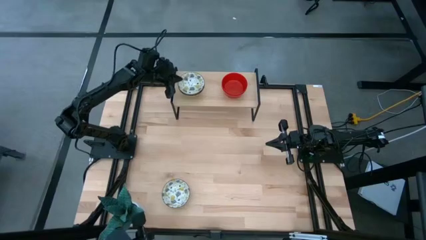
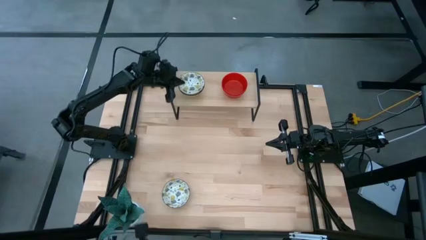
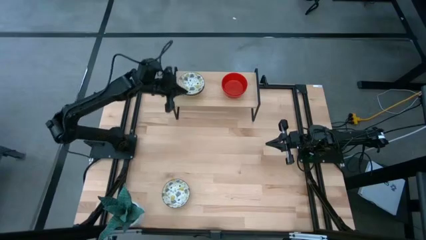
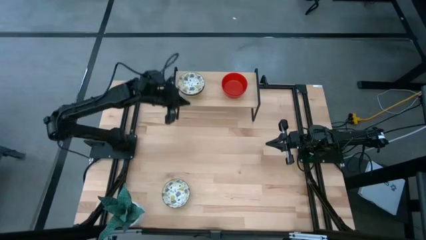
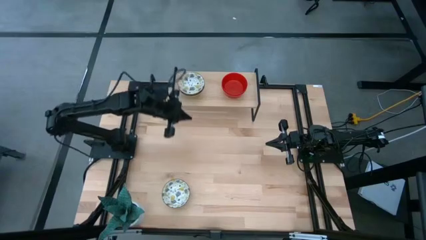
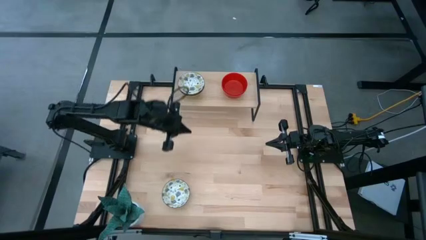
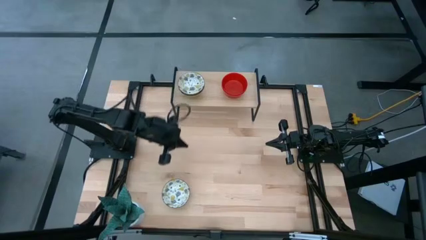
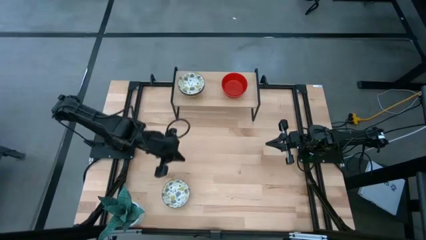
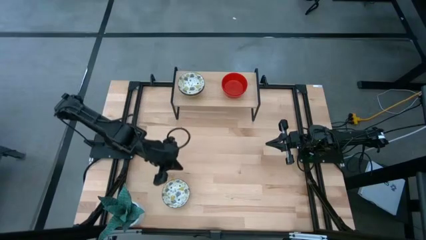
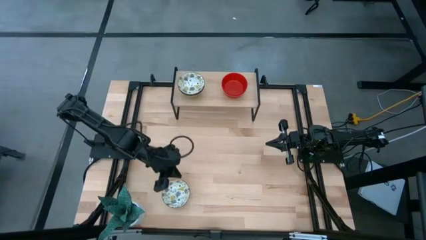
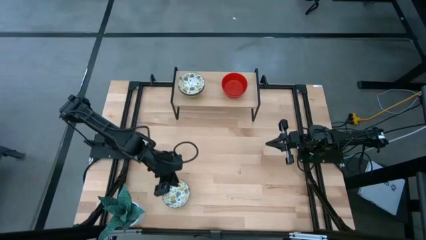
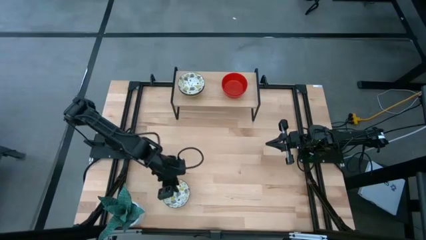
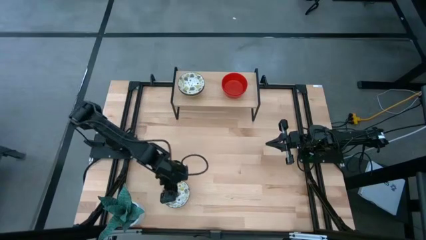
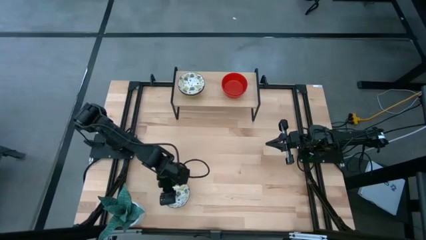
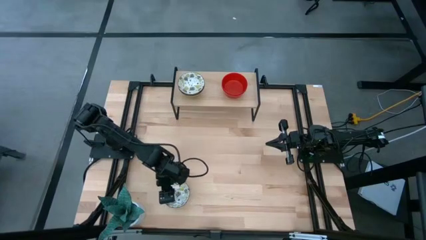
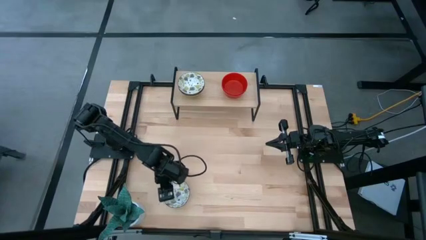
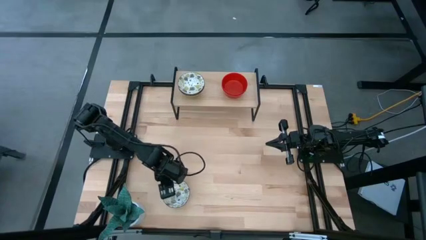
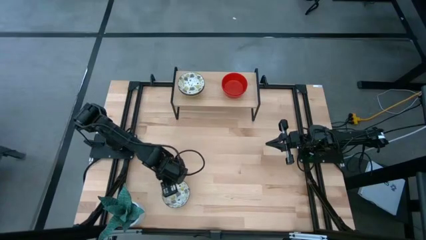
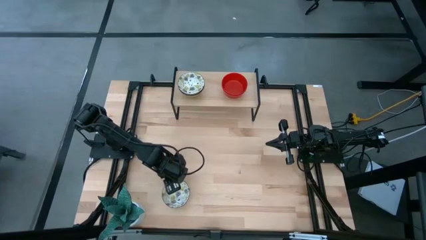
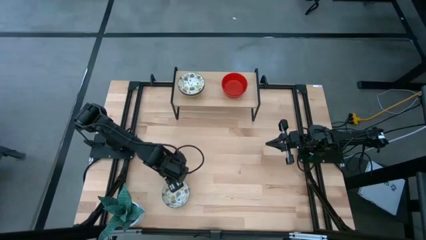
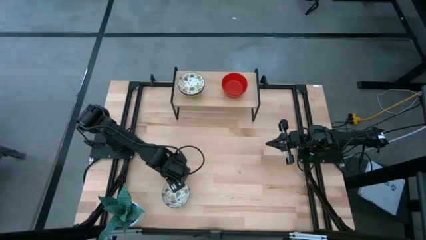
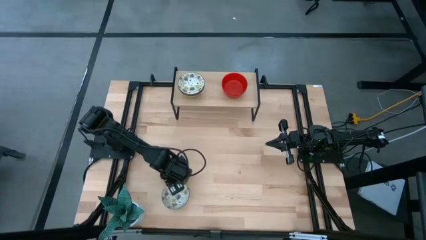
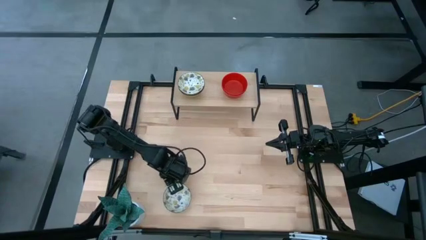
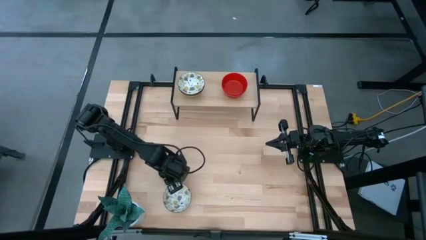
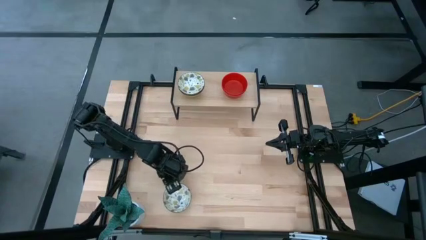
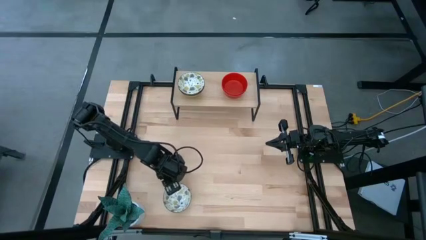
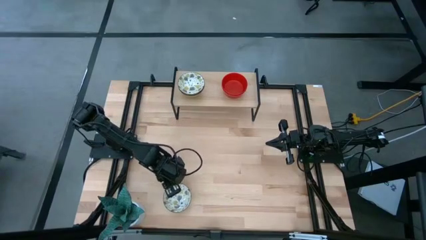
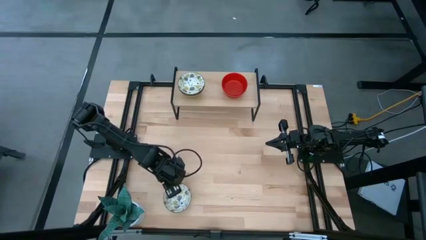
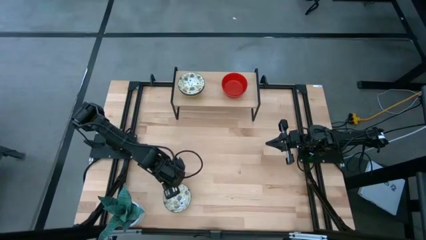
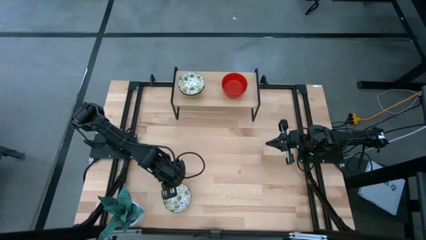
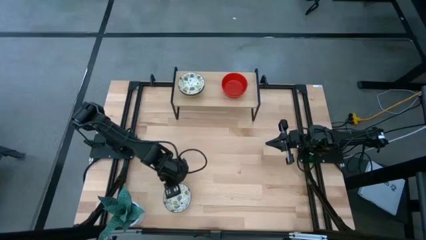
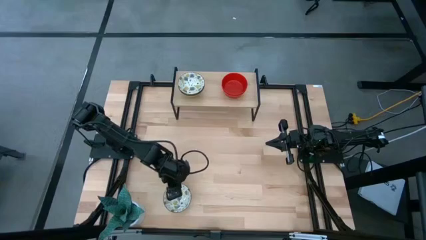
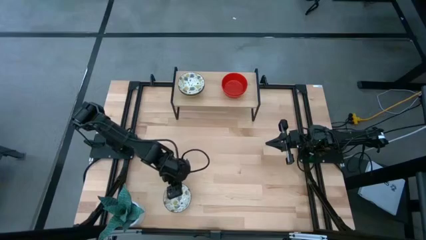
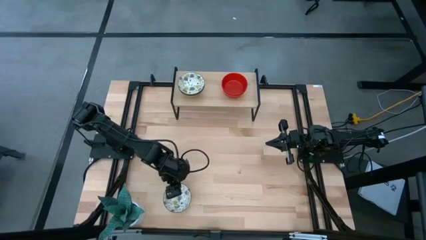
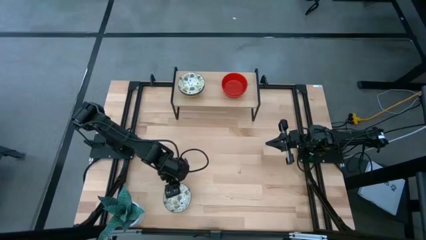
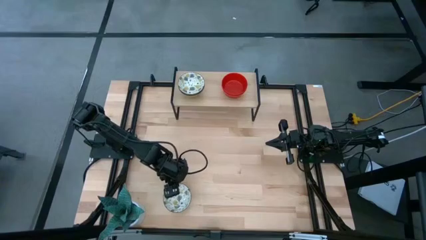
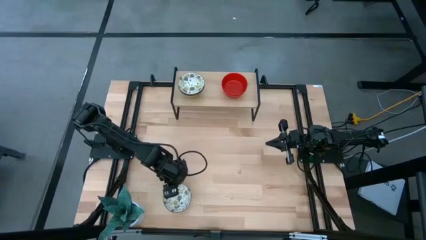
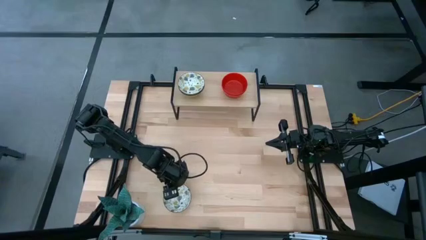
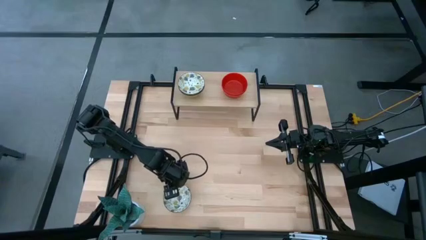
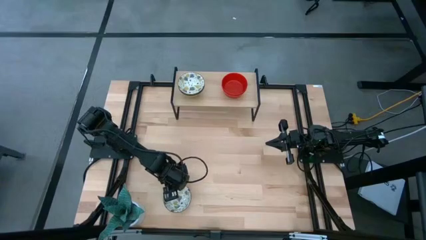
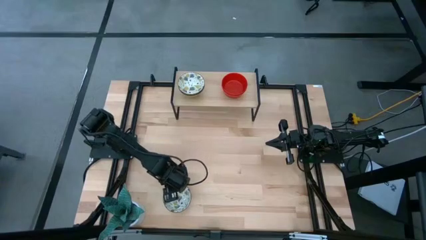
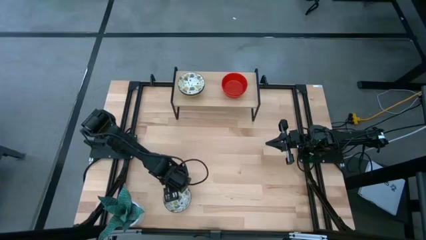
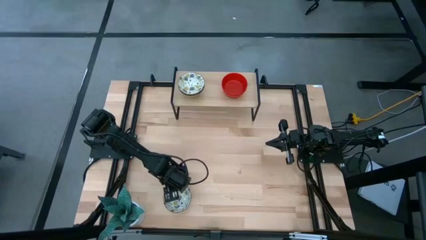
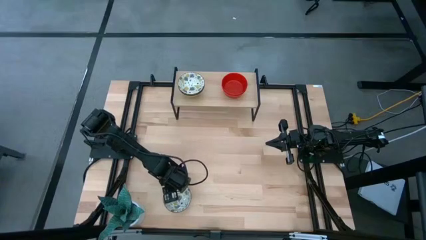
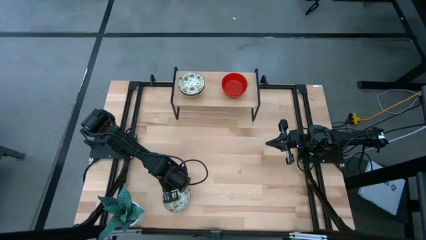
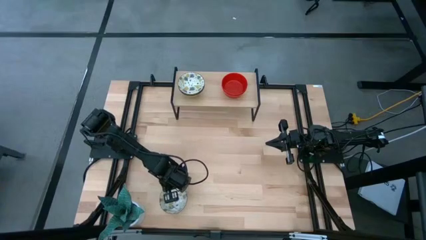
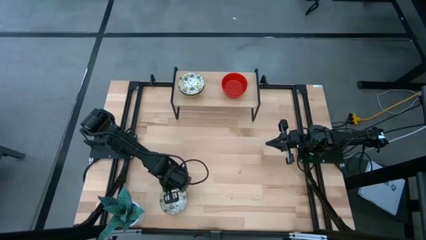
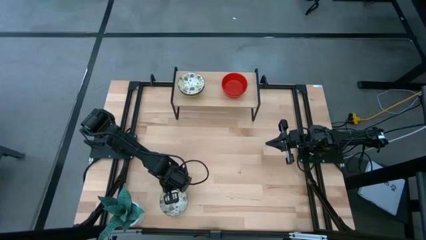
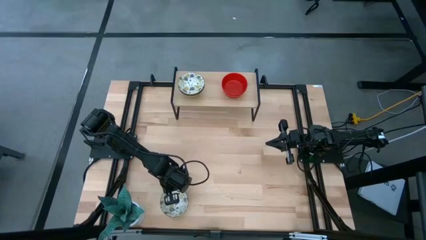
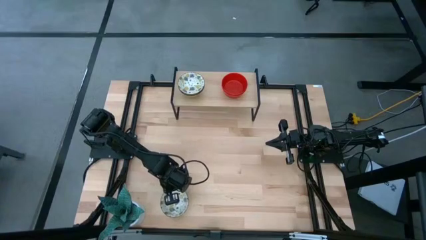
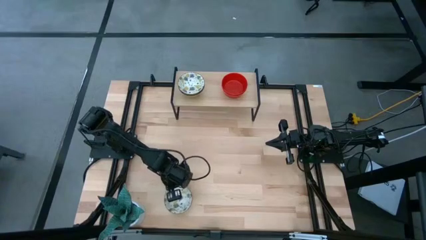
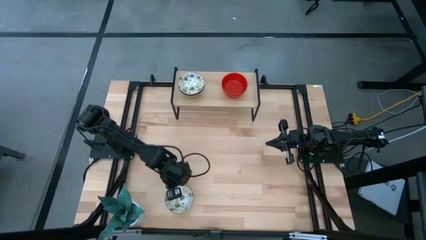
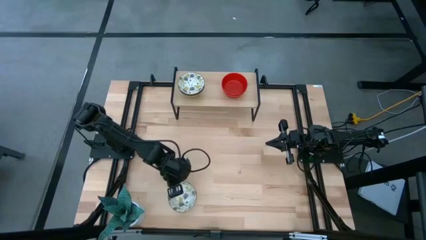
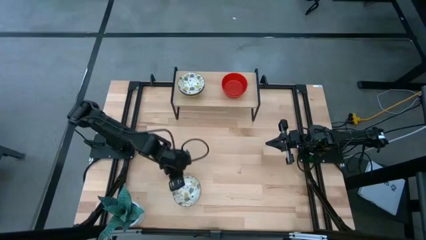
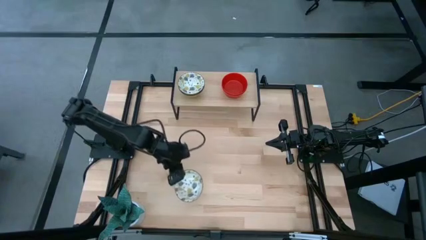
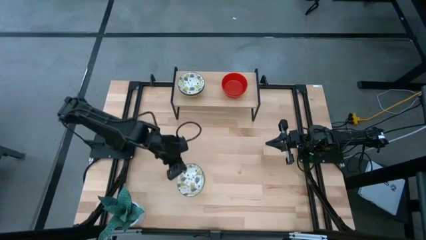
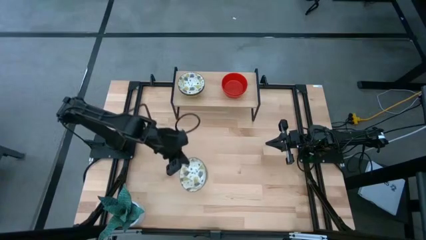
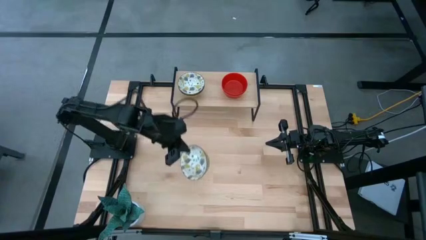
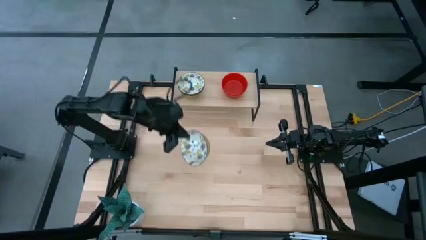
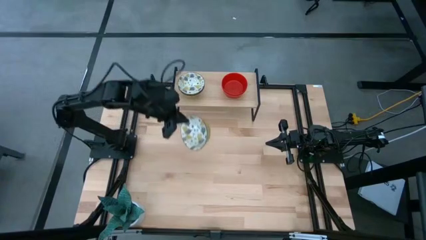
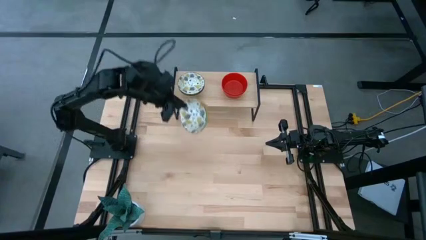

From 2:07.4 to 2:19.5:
Task: Pick & Place Mini bowls
Stack the white patterned bowl on top of the white patterned bowl on the shelf
